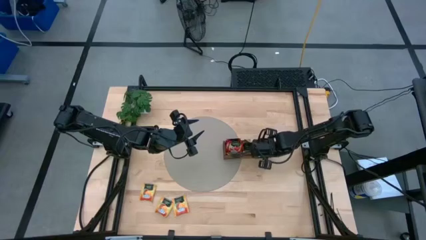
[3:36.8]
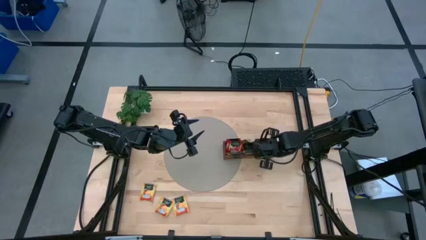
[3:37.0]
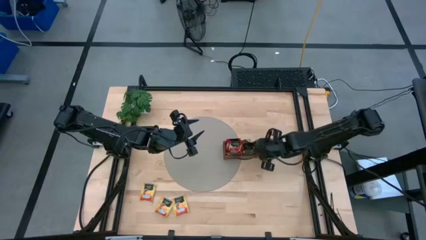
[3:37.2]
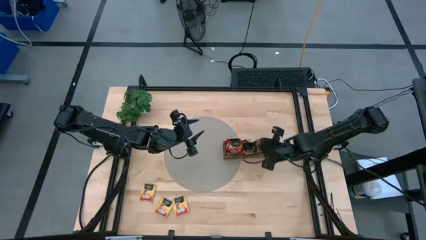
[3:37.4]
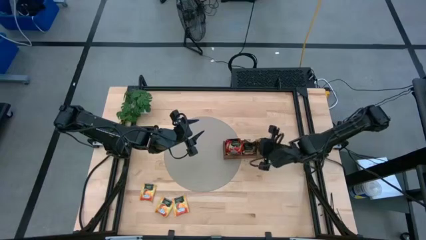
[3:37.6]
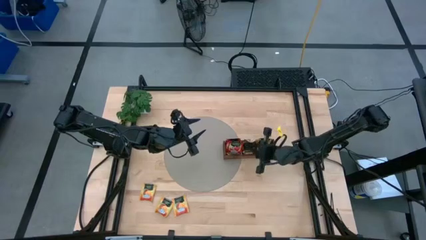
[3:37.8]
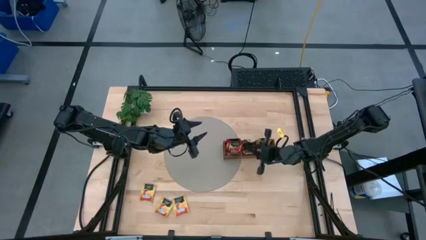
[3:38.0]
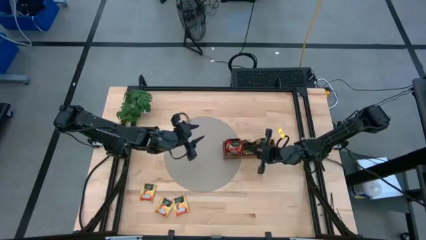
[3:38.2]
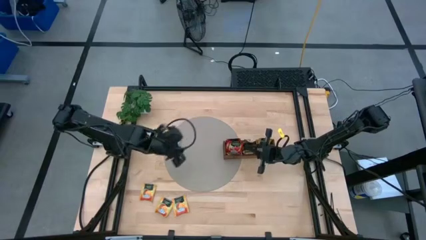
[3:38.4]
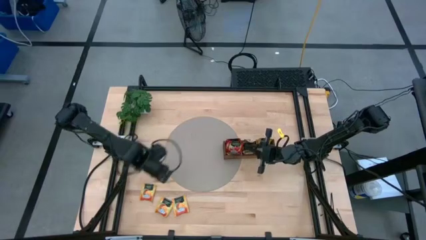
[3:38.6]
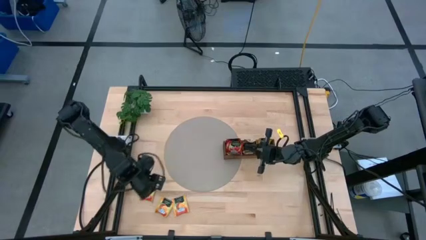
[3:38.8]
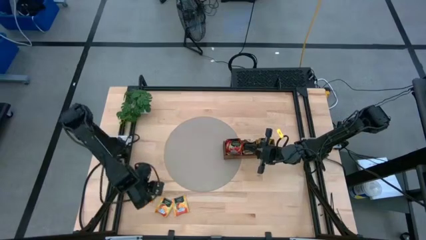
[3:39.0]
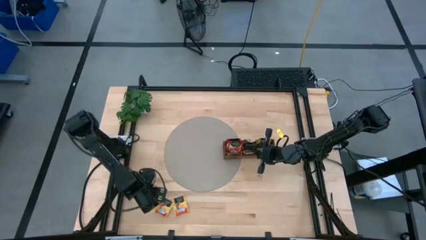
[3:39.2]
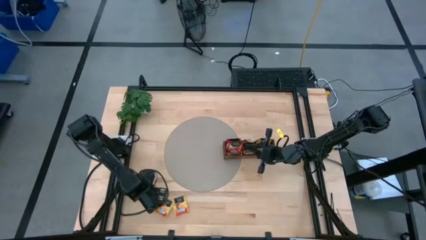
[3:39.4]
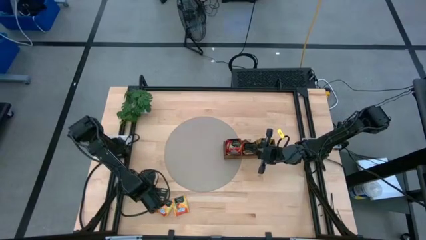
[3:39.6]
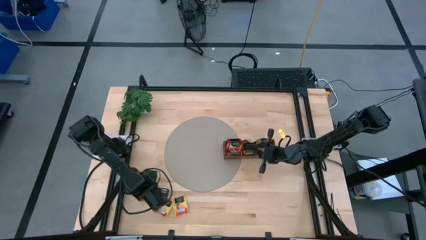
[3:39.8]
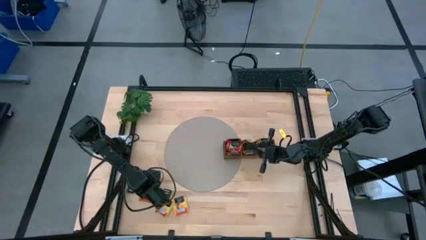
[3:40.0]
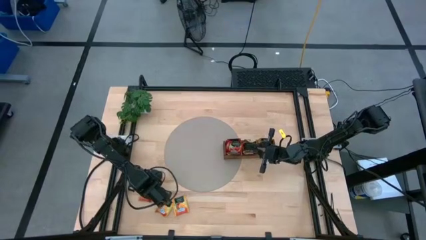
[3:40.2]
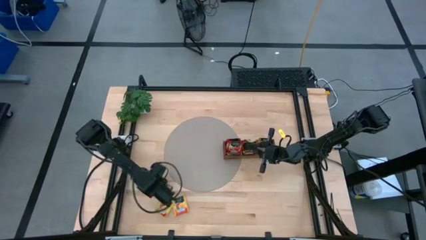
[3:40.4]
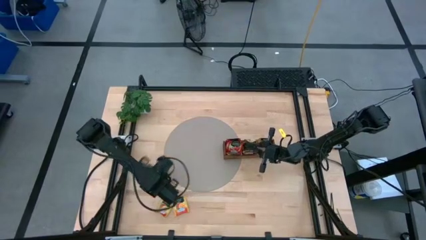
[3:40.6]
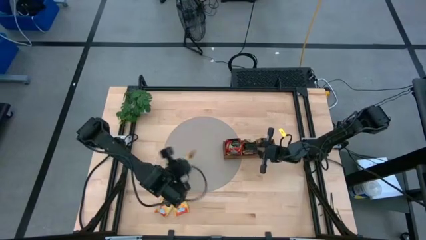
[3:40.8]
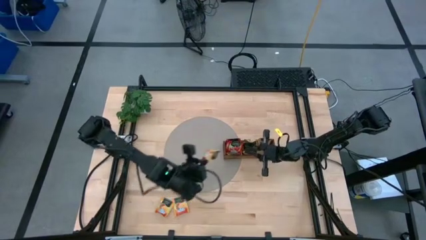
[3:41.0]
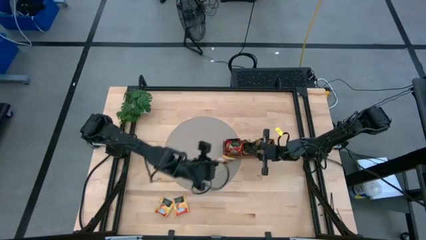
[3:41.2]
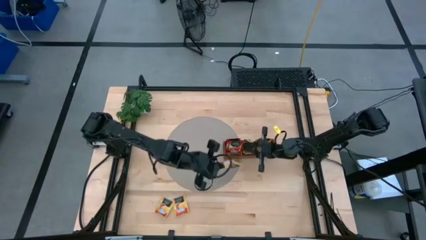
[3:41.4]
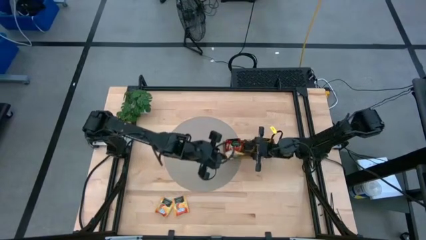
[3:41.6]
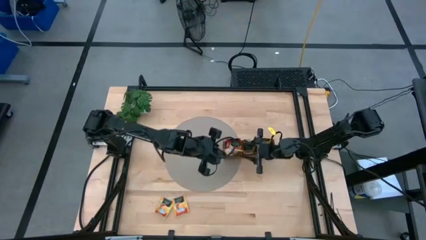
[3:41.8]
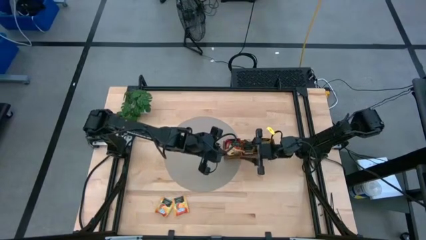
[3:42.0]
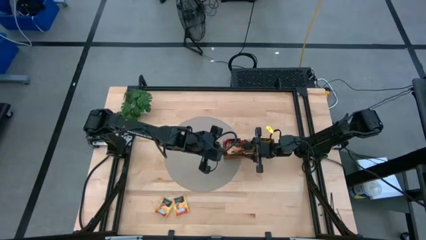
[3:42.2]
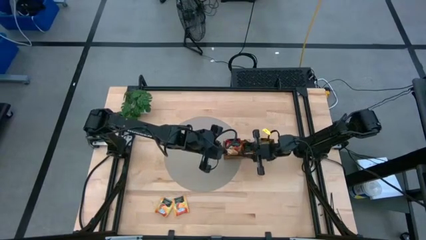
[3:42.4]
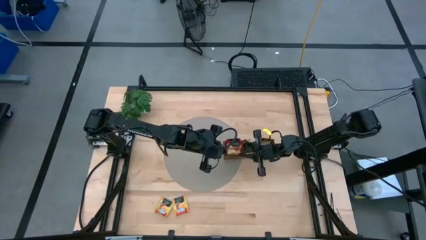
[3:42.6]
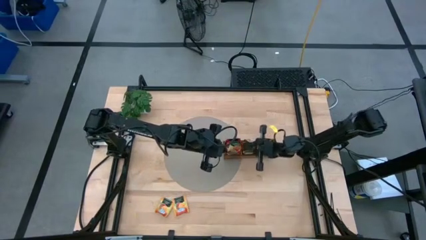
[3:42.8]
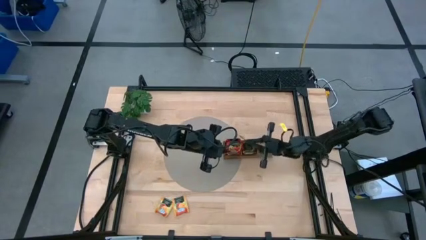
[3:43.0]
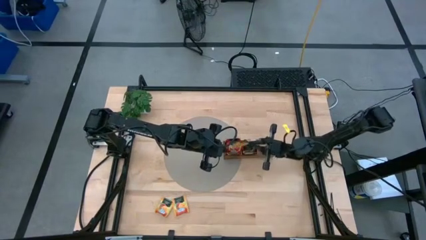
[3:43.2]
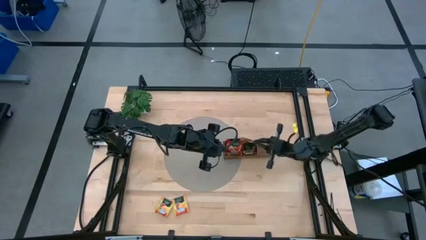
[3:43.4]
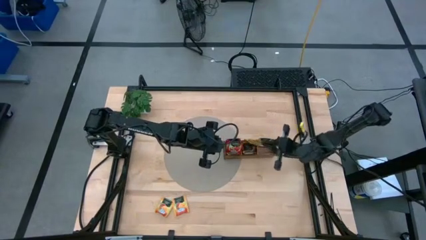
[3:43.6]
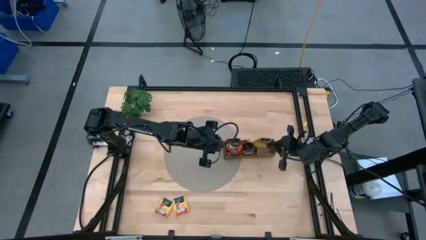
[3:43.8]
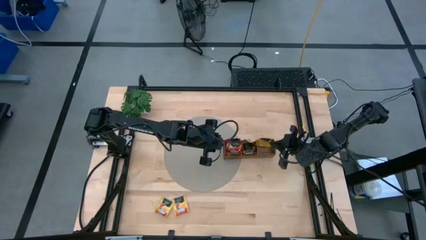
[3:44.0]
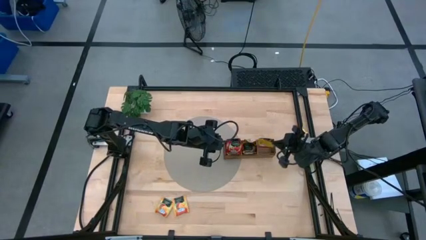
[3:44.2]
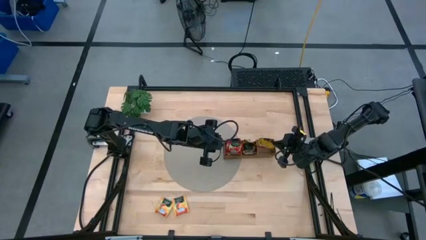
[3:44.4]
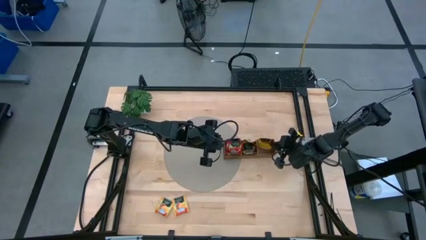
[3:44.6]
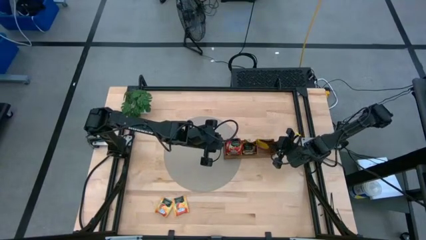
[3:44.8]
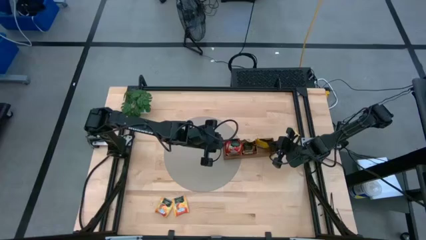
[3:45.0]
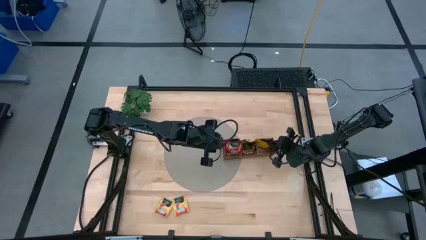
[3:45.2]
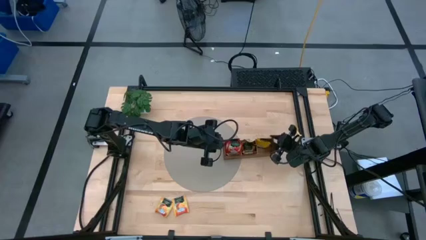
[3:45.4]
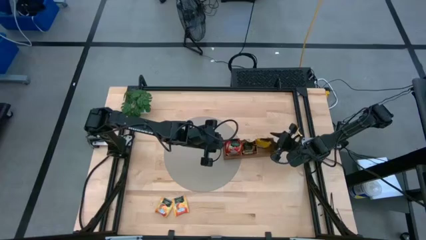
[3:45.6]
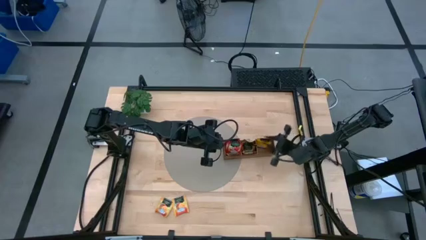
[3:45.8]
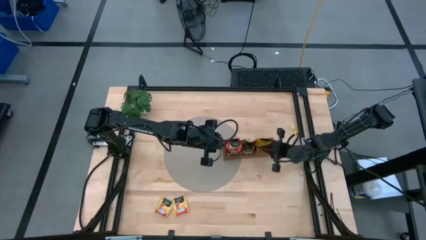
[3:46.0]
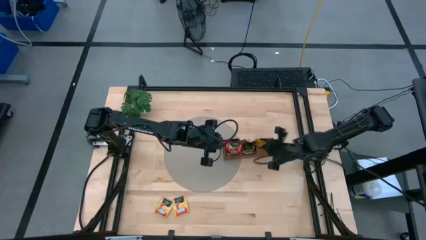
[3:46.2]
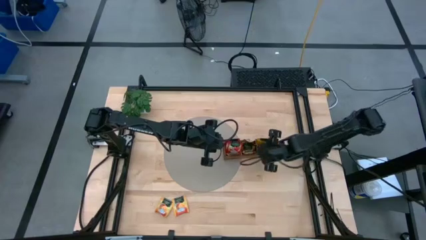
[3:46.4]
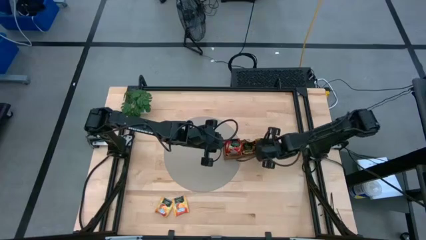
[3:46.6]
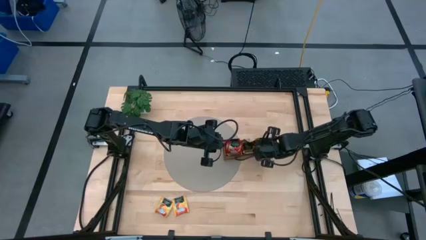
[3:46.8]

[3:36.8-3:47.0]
Task: Pick & Place Tea
Put the yellow tea bag into the right section of the wooden organizer

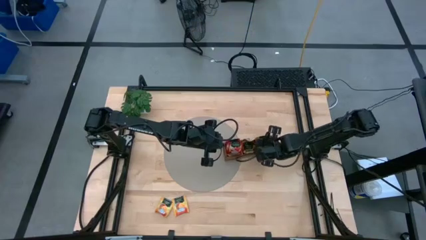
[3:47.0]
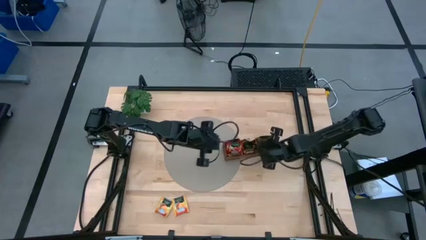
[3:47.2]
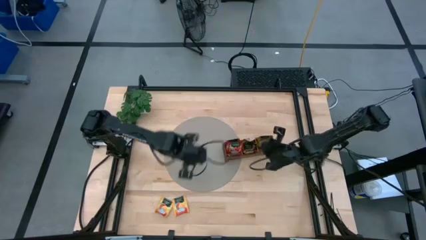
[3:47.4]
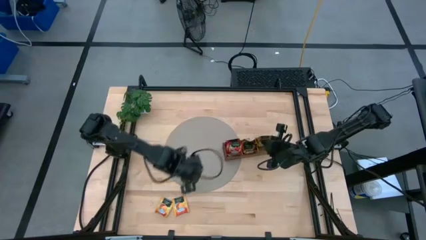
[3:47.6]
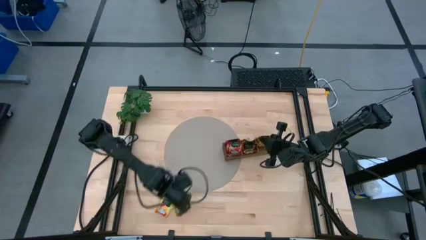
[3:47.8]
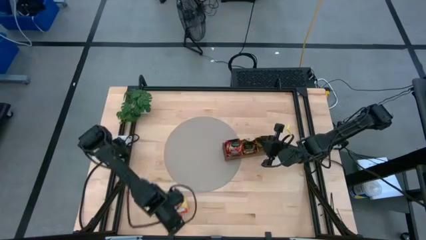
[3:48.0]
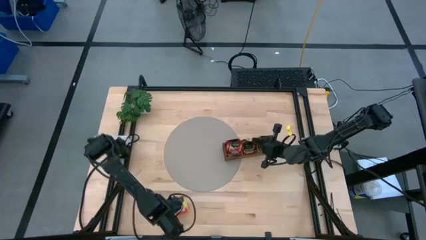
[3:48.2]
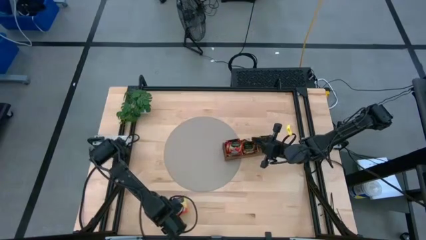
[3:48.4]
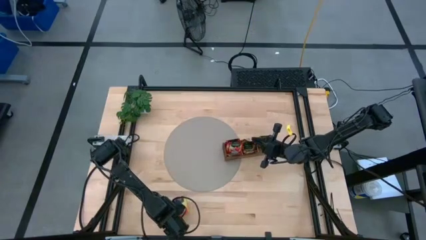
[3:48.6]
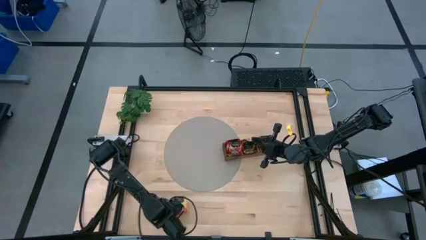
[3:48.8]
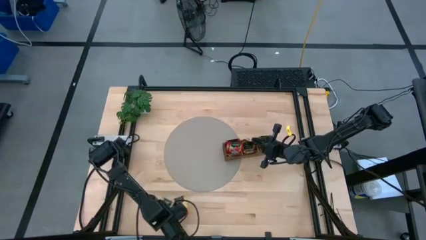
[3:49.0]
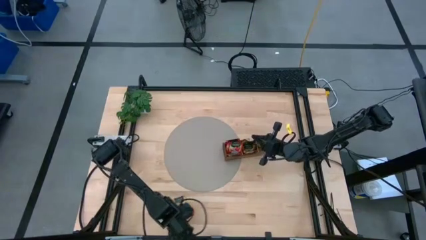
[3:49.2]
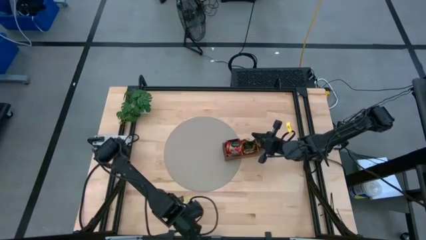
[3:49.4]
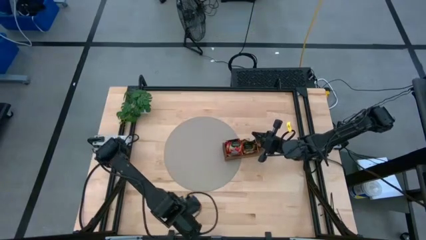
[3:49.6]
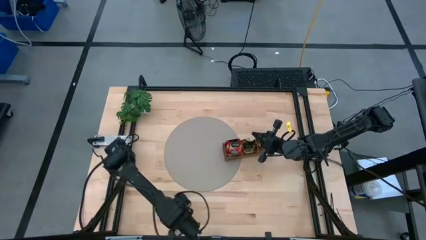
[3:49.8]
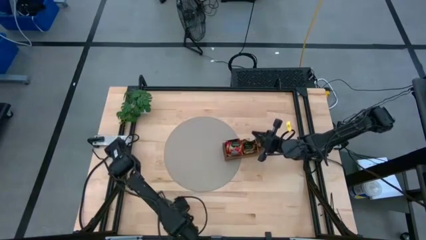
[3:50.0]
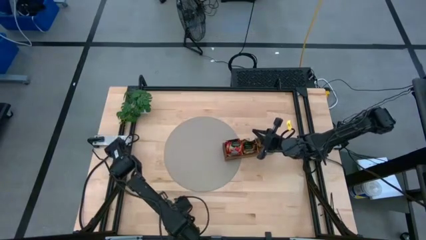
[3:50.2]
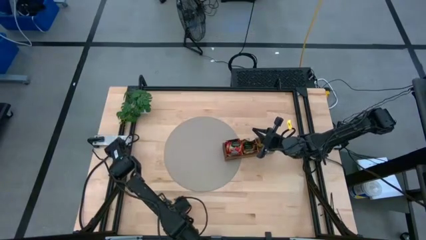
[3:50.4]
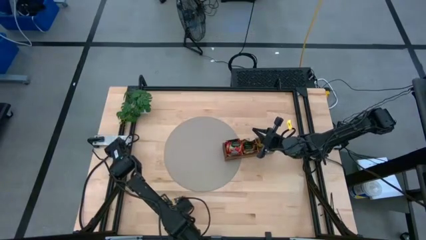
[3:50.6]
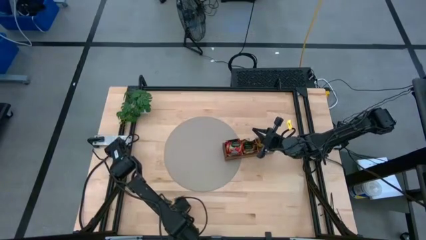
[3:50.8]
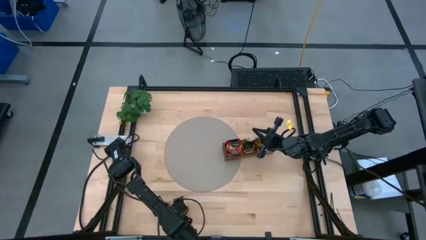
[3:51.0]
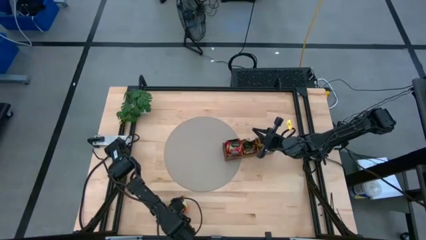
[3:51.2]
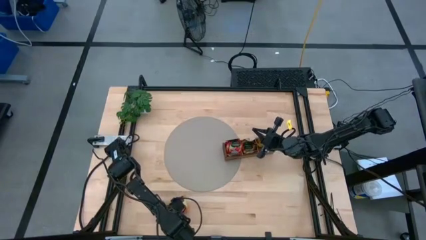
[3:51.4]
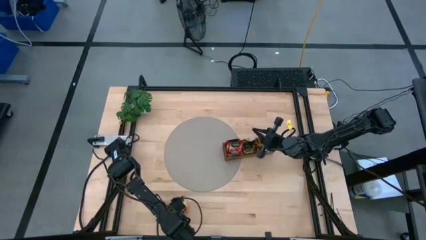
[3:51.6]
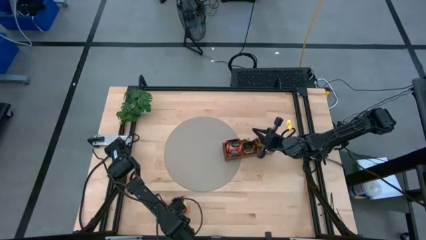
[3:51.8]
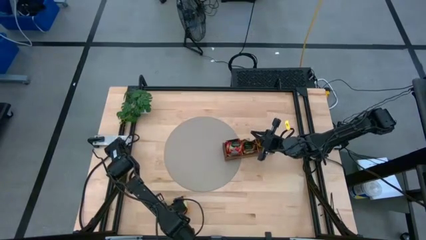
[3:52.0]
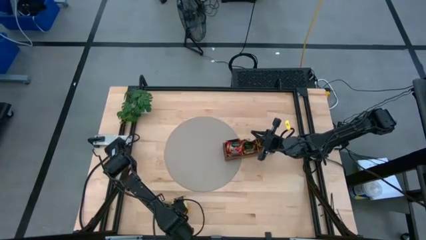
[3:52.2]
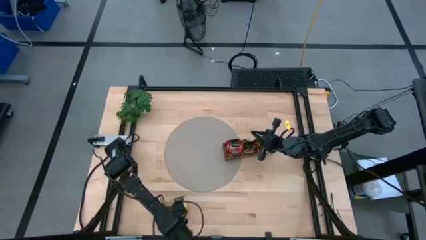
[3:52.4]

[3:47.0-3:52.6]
Put the yellow tea bag into the right section of the wooden organizer
